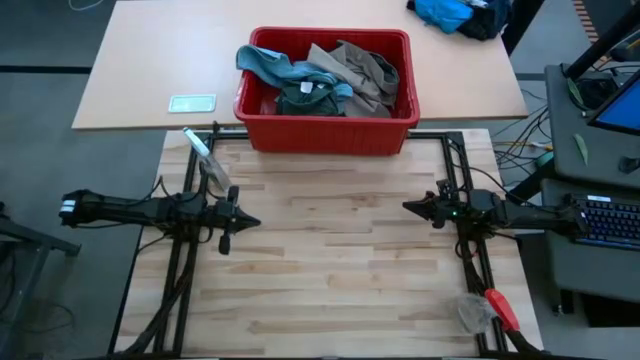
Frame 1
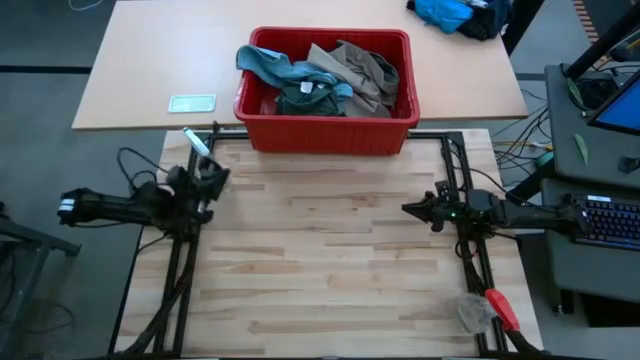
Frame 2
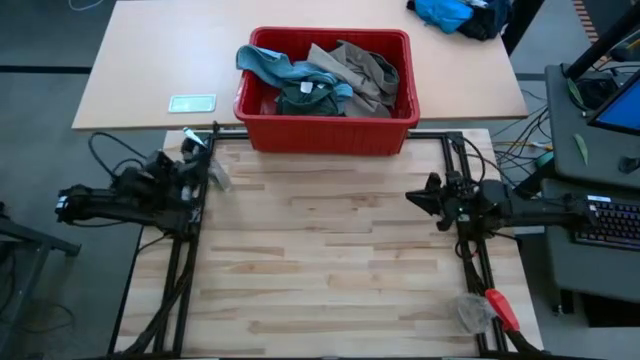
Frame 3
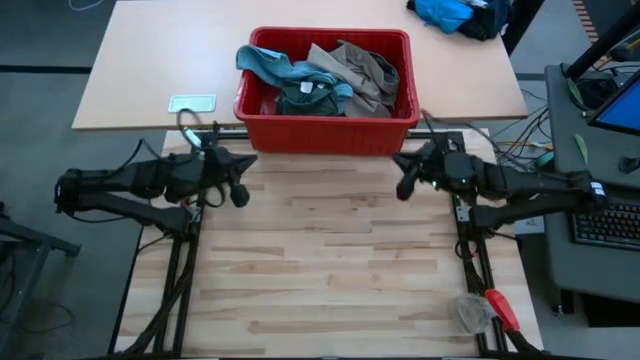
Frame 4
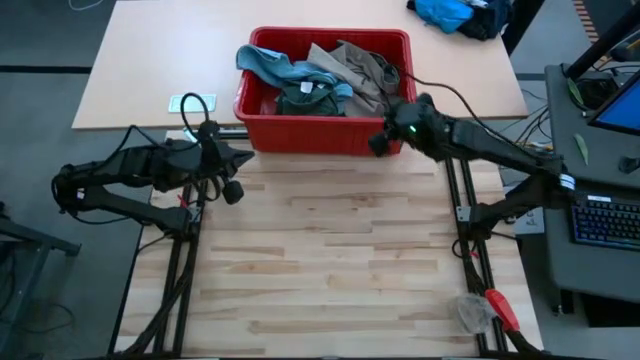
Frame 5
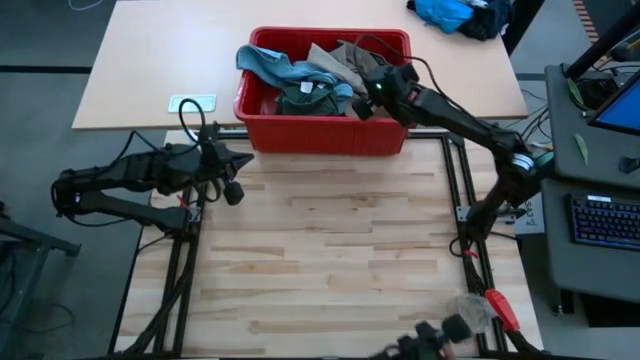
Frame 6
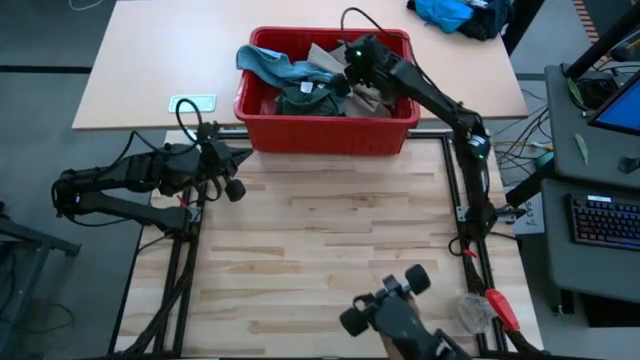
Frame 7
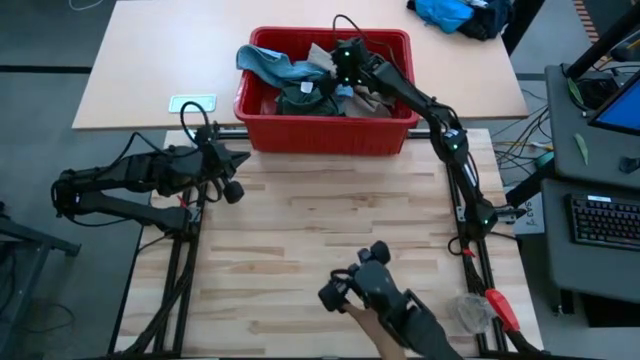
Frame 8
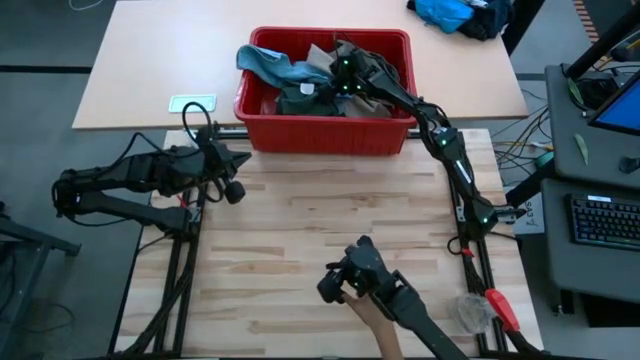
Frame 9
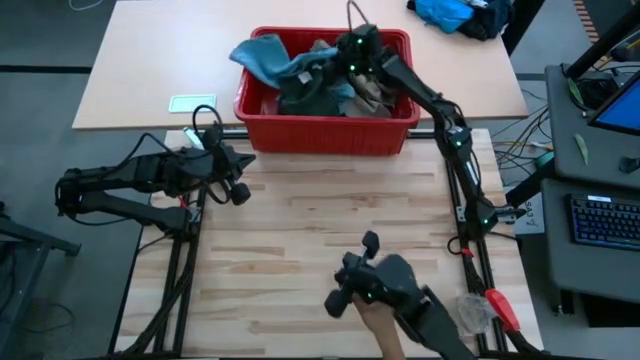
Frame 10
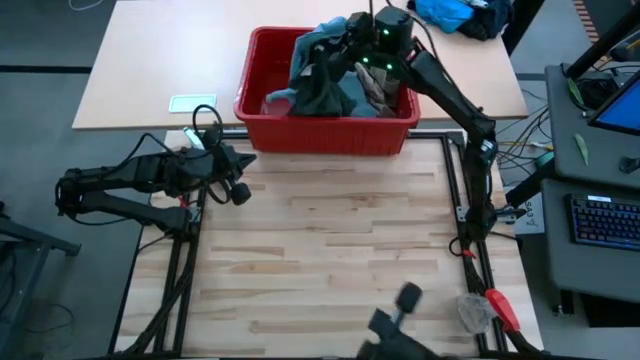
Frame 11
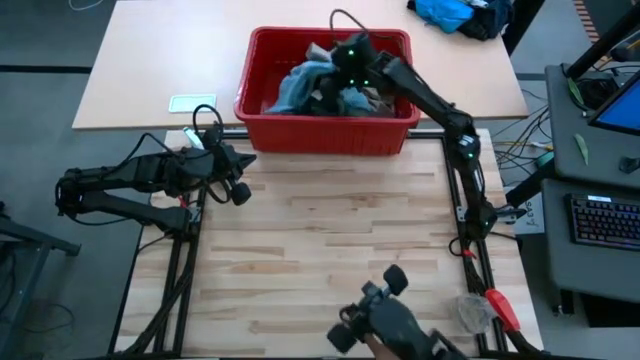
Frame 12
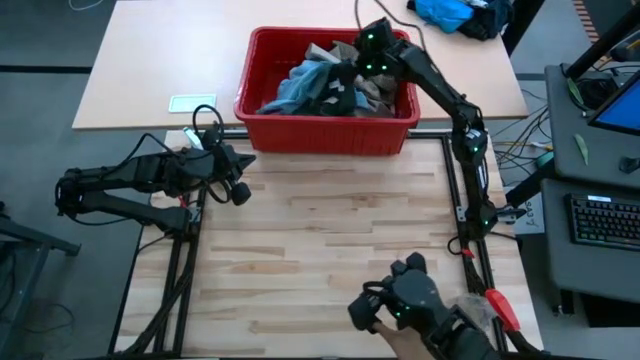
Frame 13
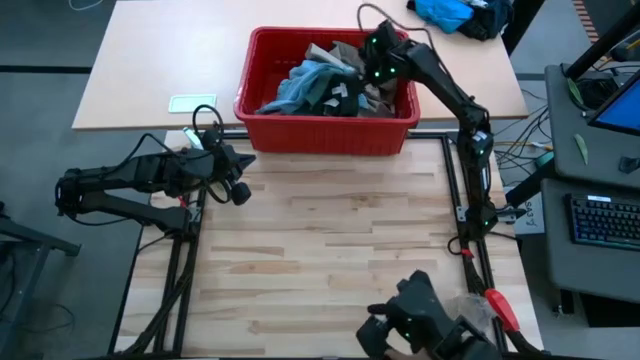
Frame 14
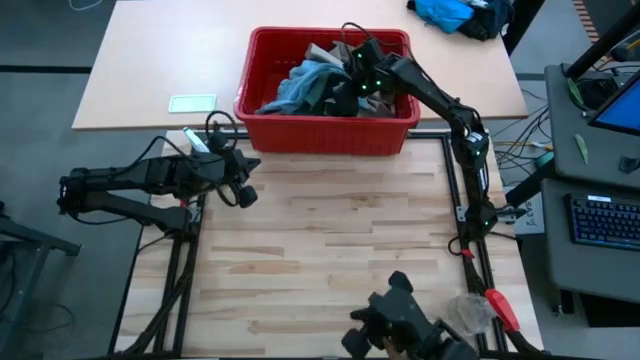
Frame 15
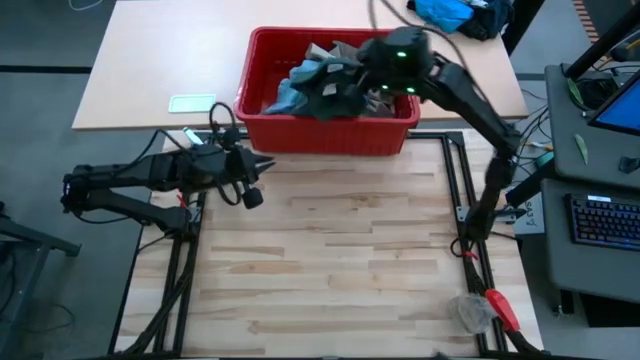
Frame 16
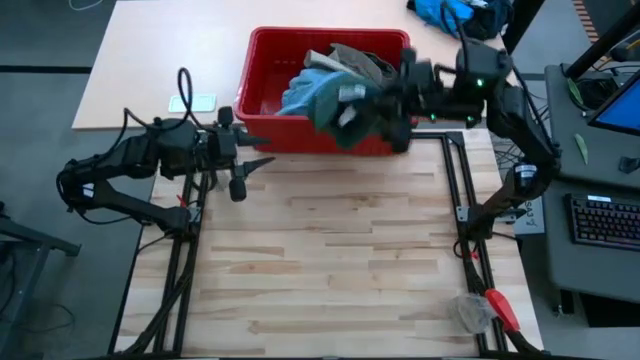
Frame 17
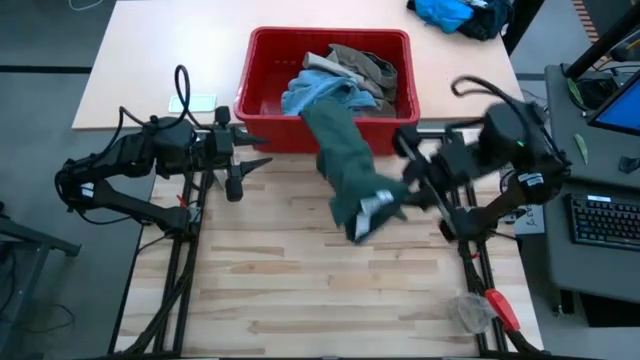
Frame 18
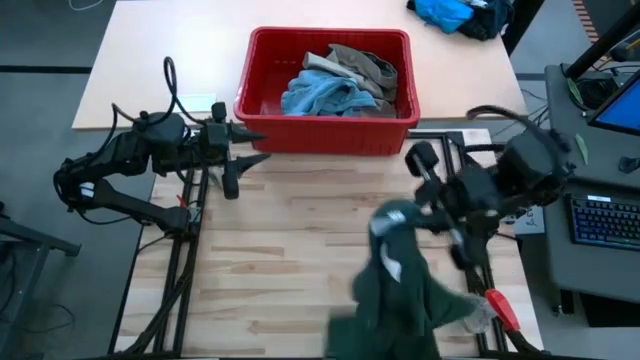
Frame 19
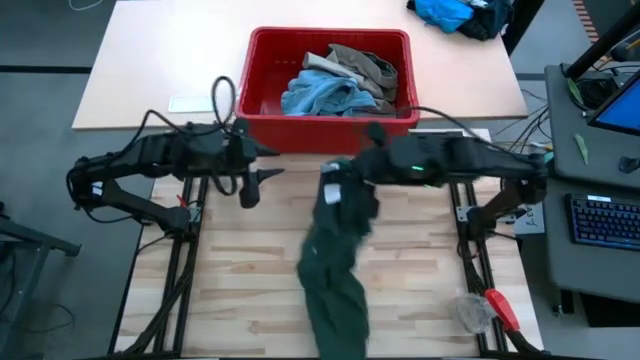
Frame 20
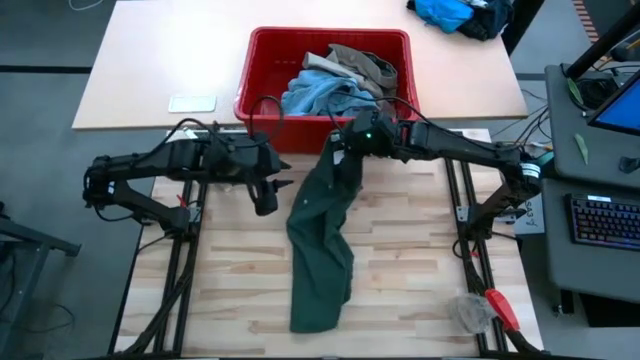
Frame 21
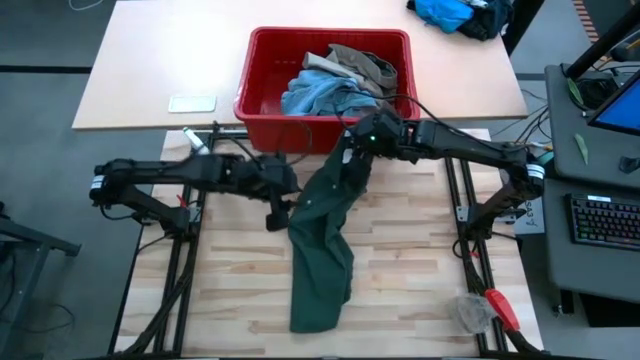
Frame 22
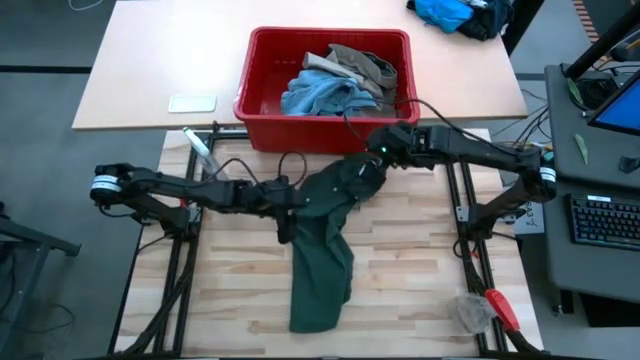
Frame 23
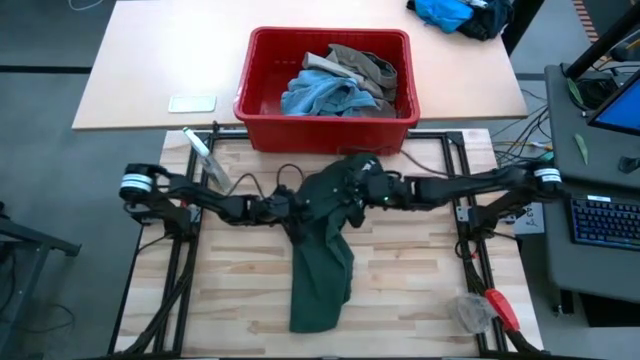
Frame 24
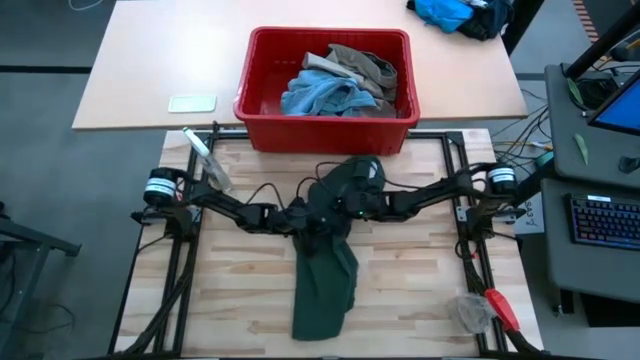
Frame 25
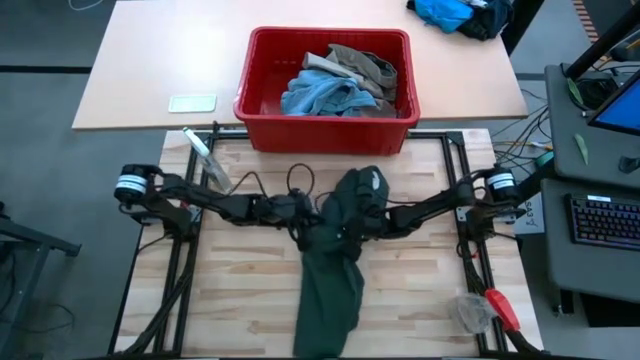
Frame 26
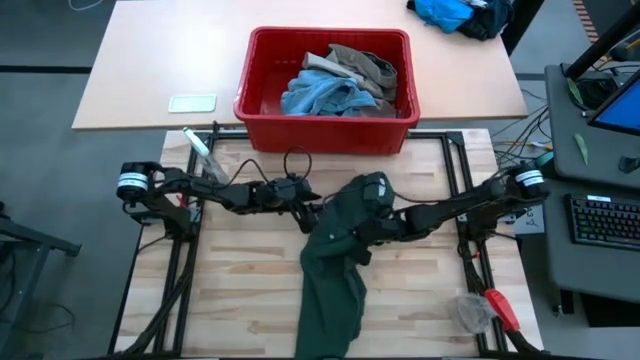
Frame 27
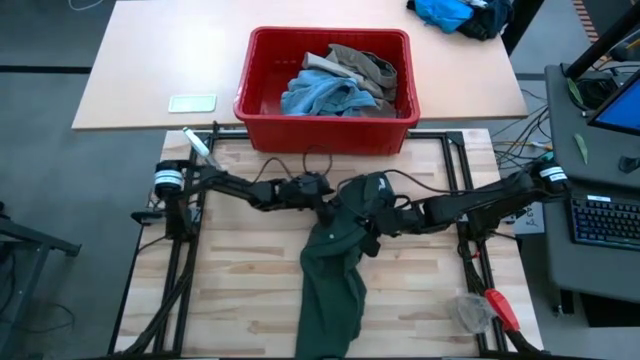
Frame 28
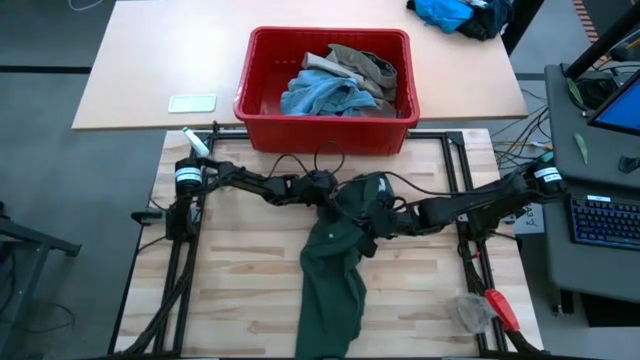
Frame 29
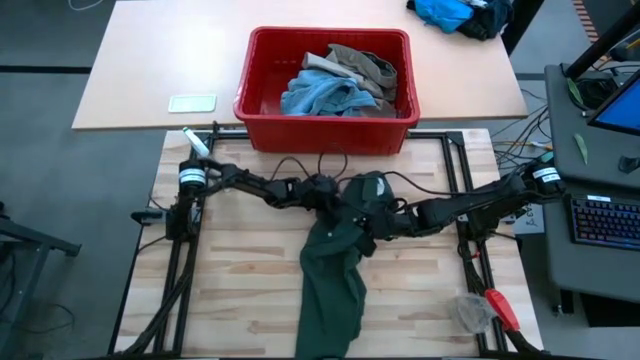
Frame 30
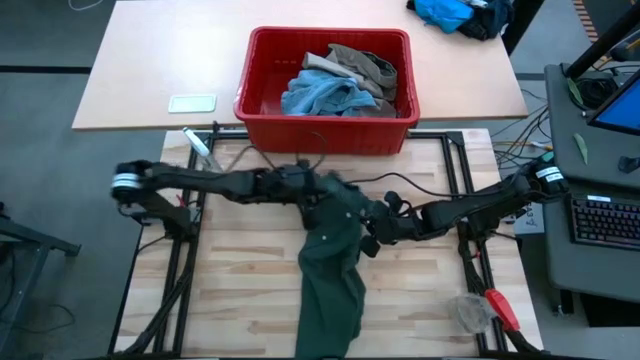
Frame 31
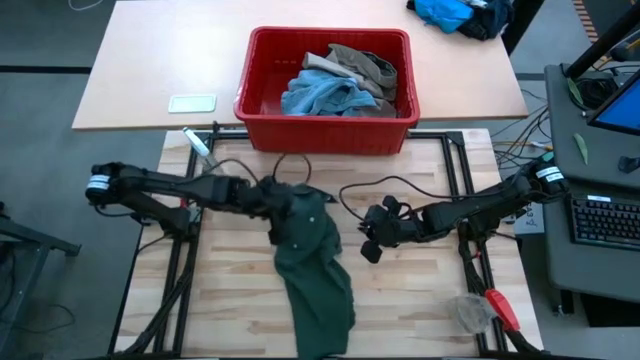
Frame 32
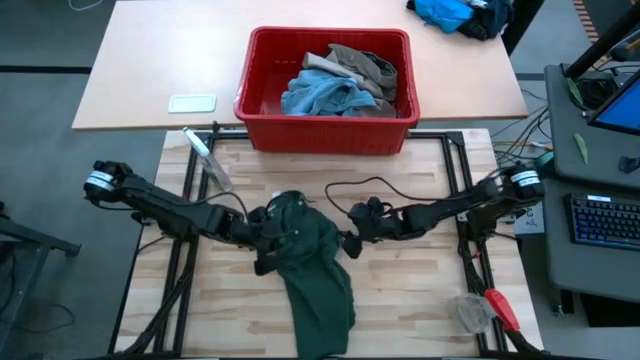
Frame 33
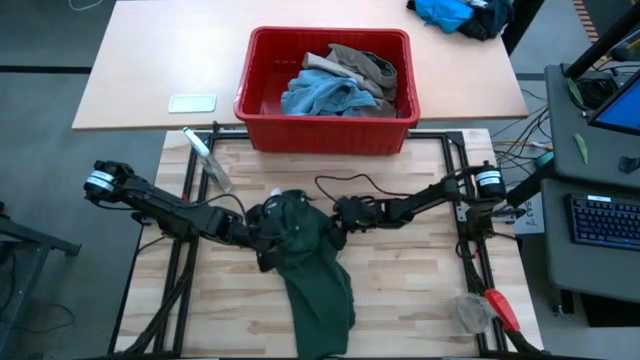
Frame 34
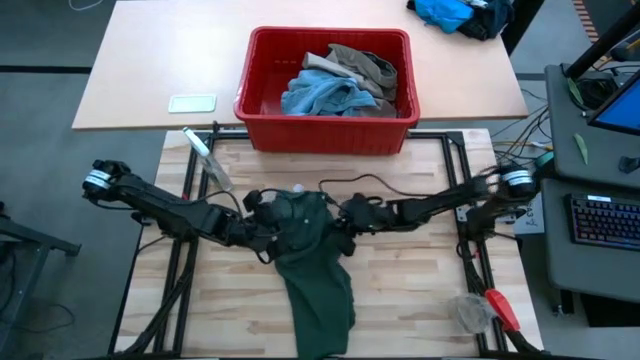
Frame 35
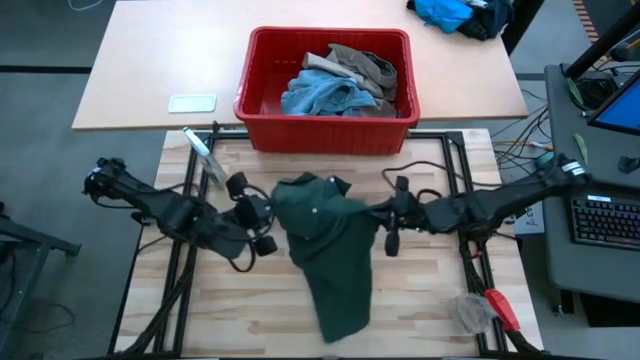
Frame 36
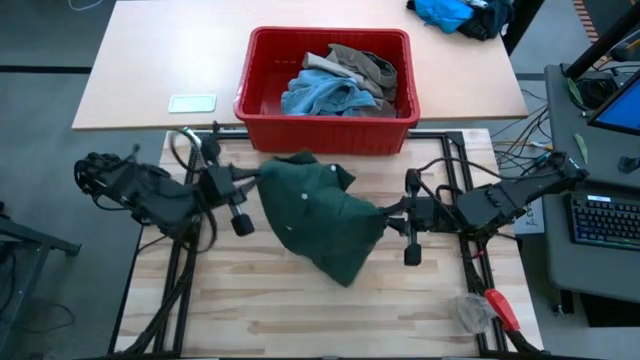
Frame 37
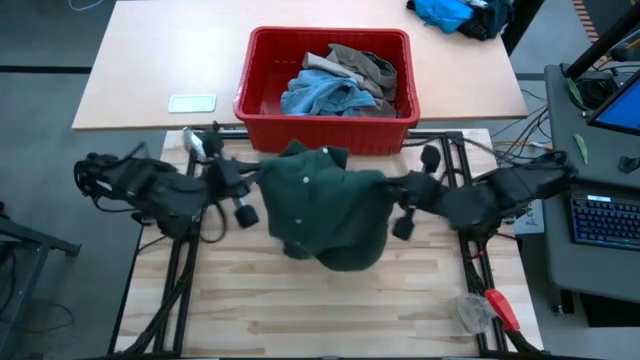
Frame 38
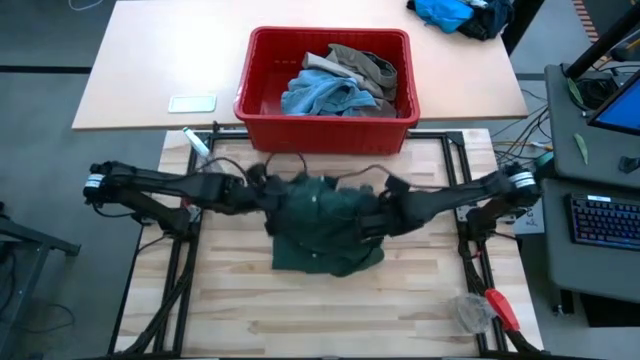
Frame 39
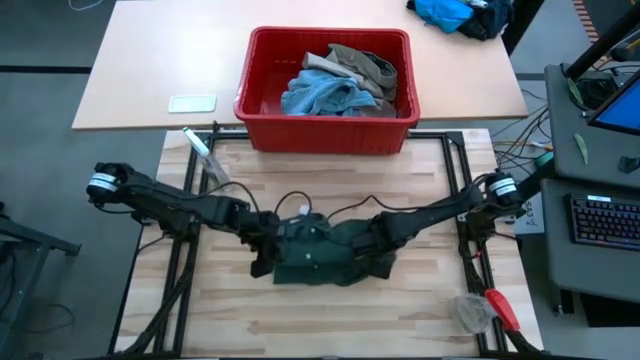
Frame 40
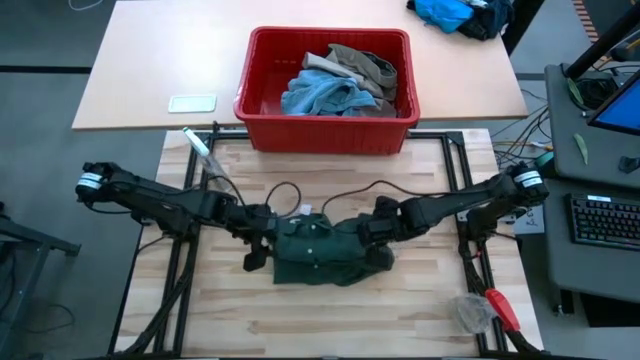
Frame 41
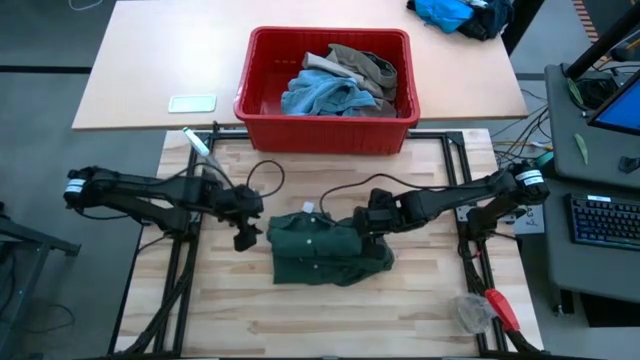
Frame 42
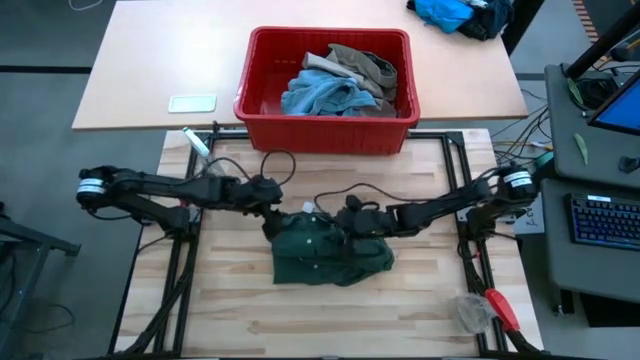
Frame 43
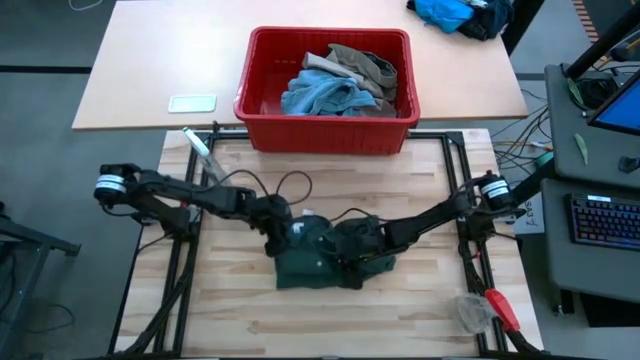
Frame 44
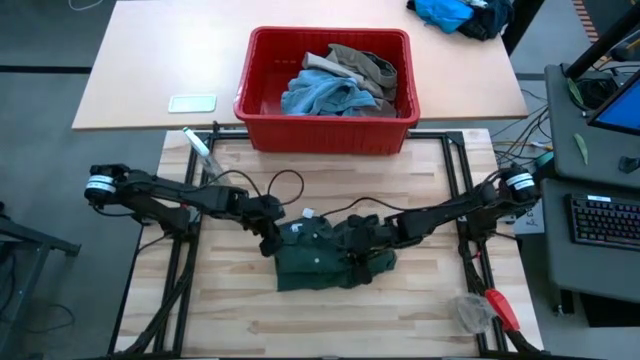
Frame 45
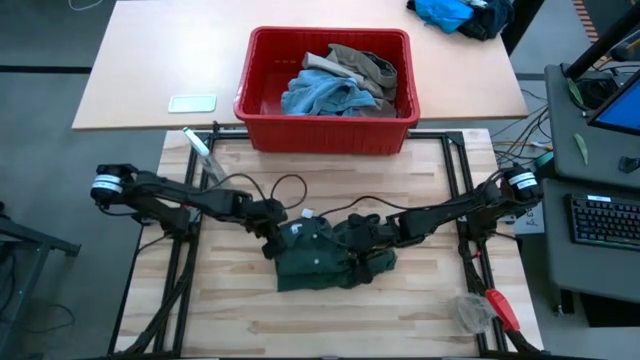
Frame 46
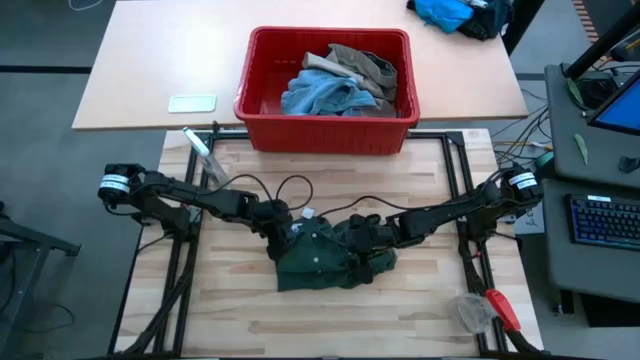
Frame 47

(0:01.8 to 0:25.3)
Task: Fold Laundry from Bin
Fold the green polo shirt
